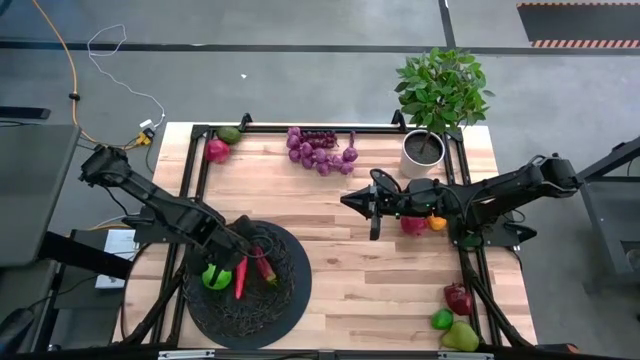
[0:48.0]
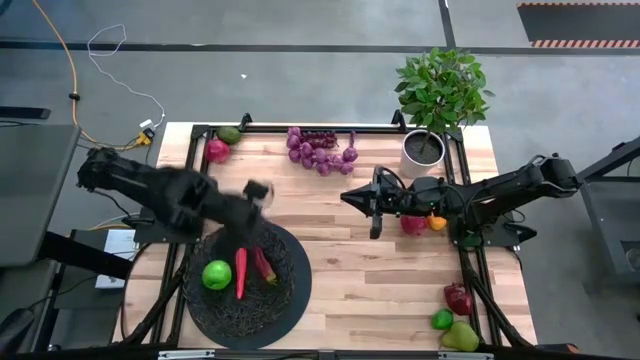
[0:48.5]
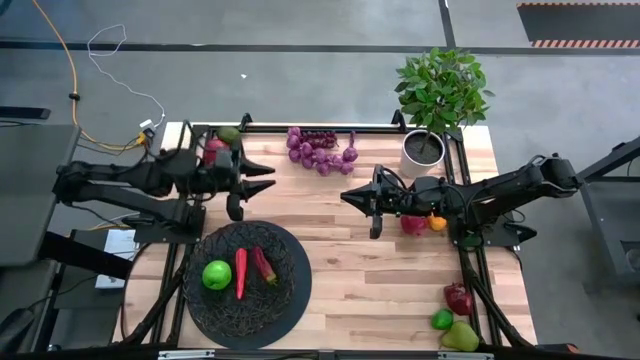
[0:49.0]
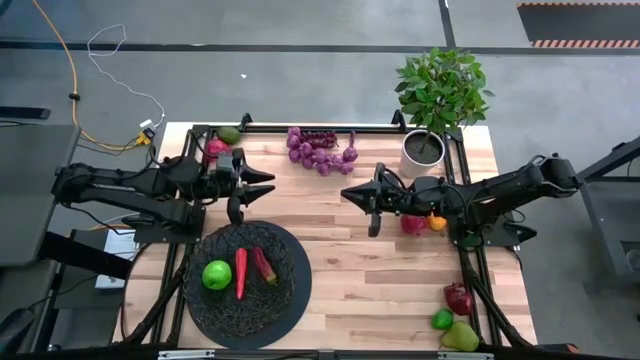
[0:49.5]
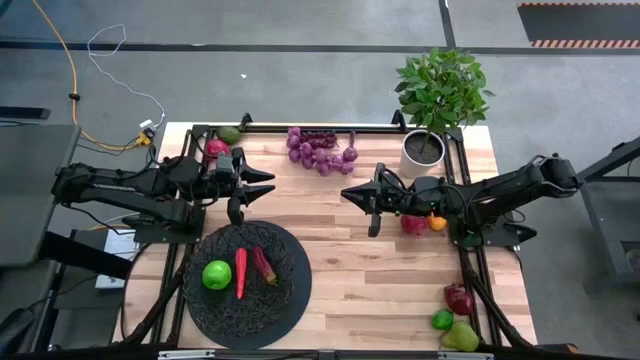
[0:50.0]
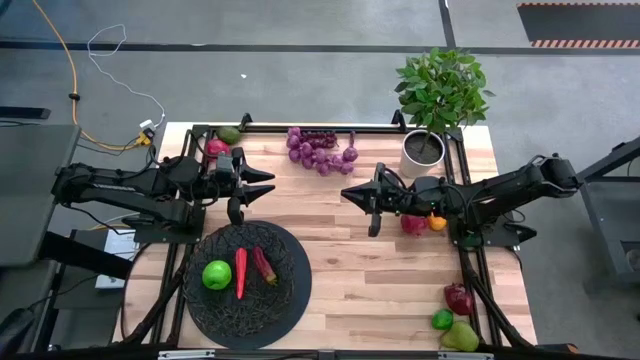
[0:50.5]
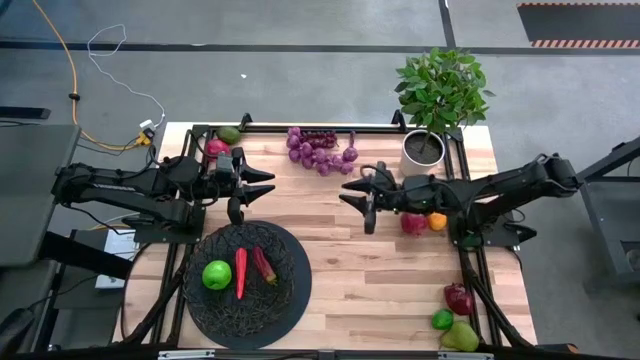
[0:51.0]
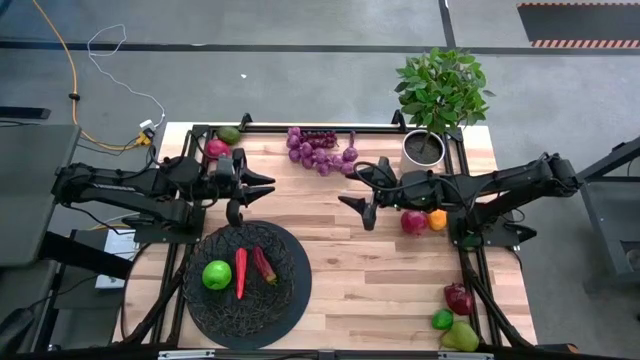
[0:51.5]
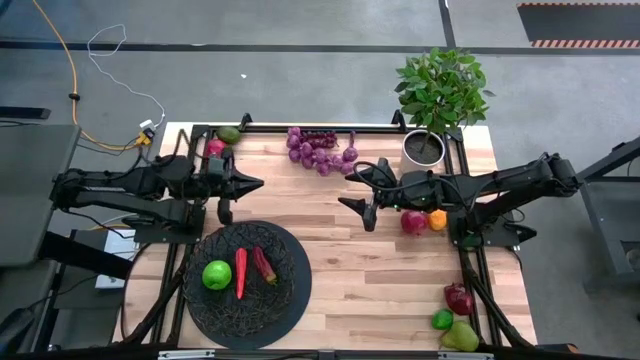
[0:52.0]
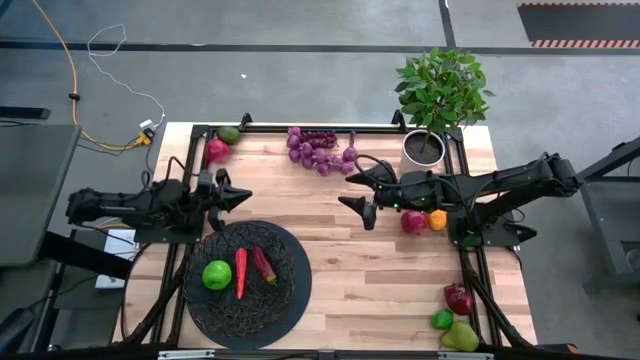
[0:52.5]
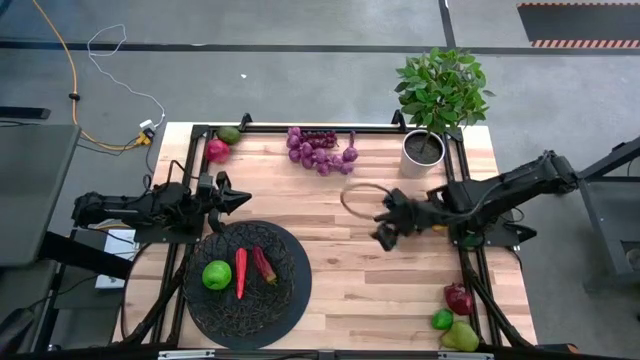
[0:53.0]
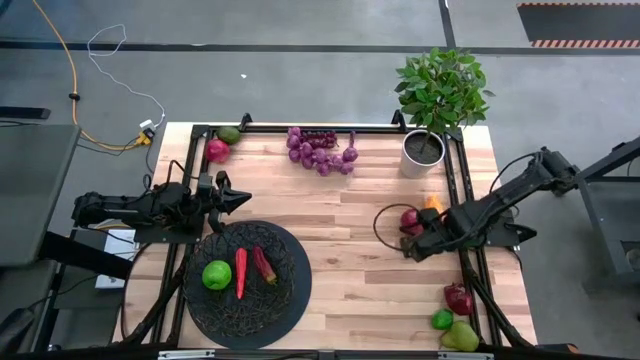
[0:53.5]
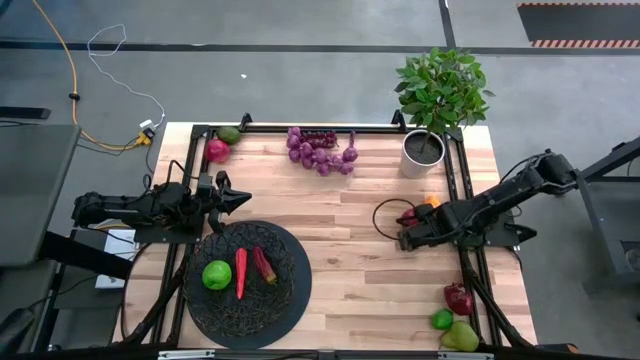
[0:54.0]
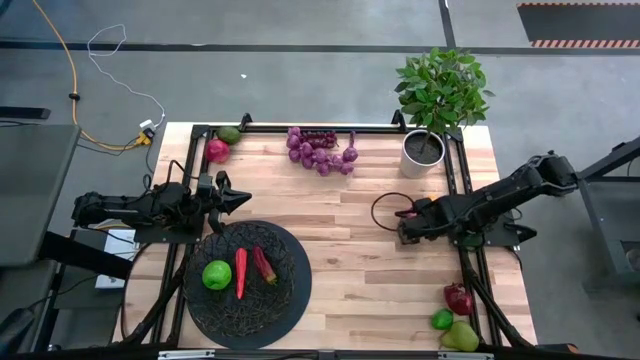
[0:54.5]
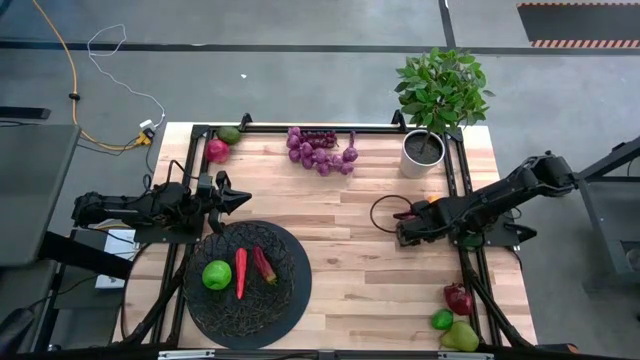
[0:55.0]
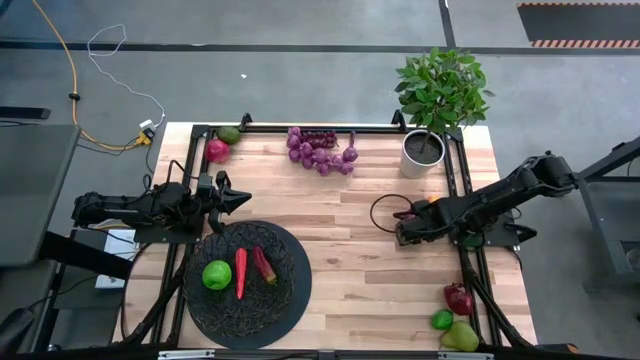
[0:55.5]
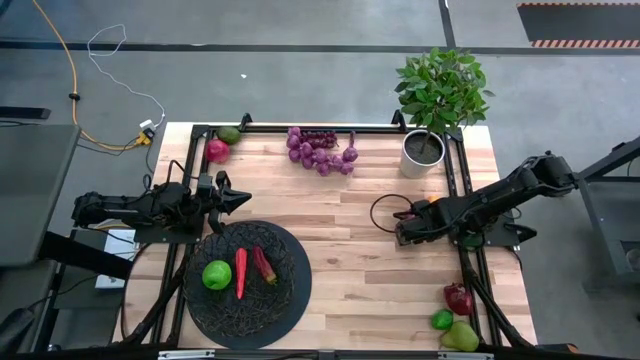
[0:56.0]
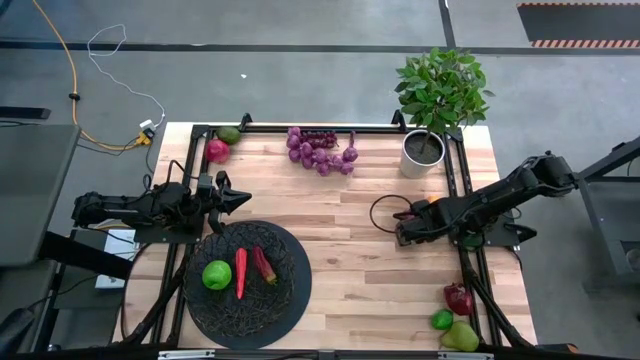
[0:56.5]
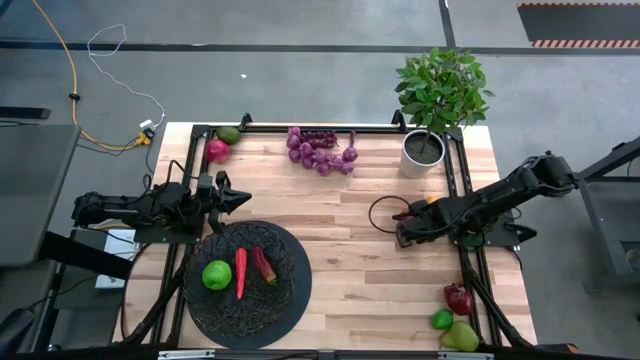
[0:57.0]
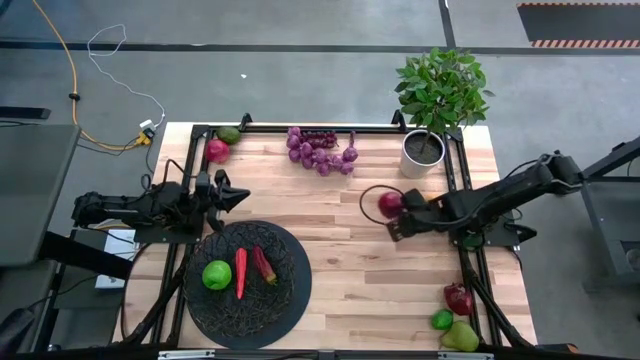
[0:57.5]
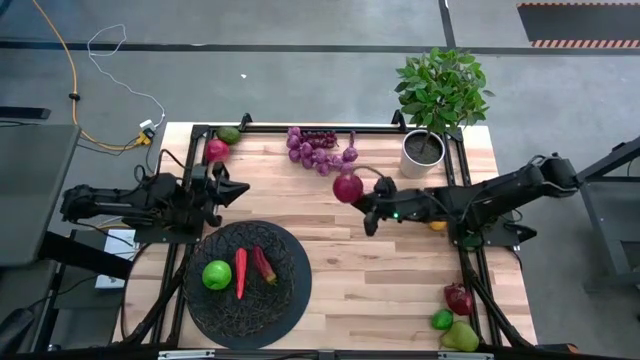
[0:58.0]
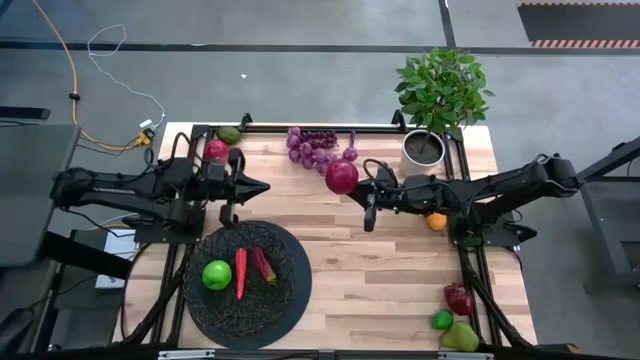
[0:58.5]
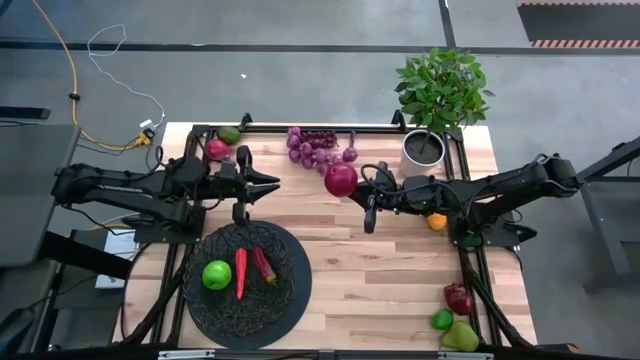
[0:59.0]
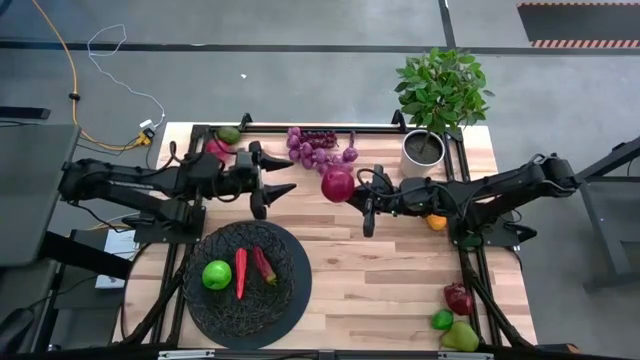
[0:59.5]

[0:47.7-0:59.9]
Task: Build produce basket
Put the bottom pomegranate into the black basket

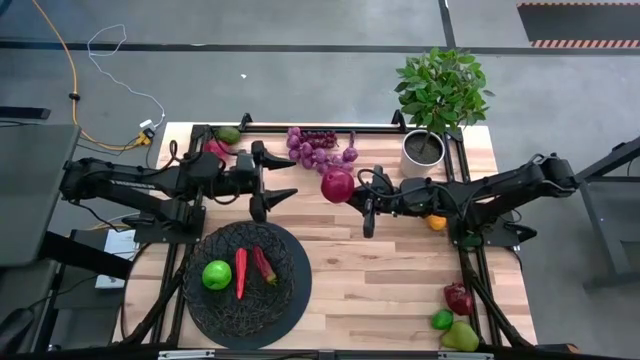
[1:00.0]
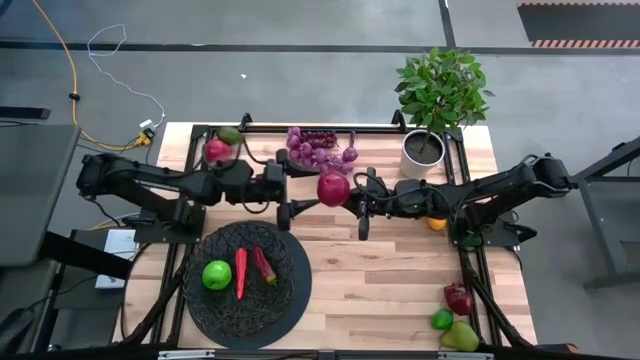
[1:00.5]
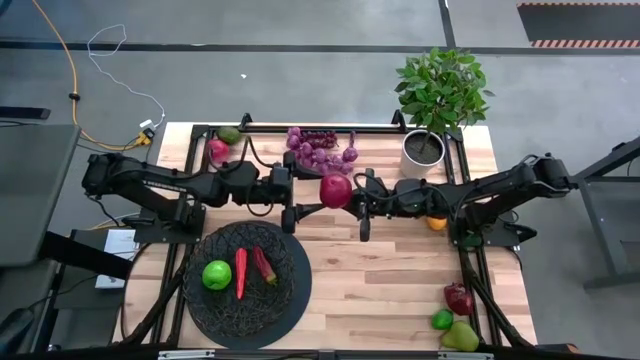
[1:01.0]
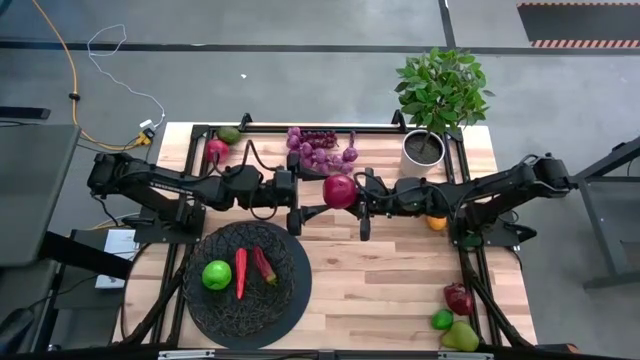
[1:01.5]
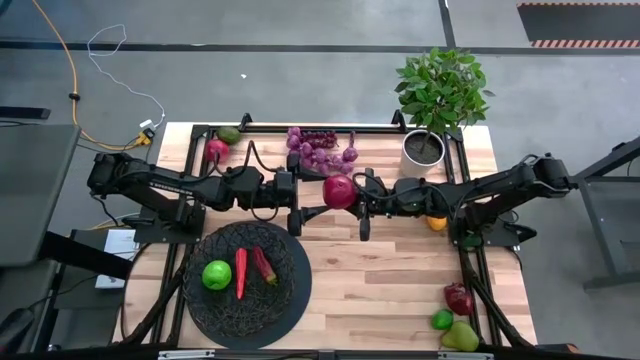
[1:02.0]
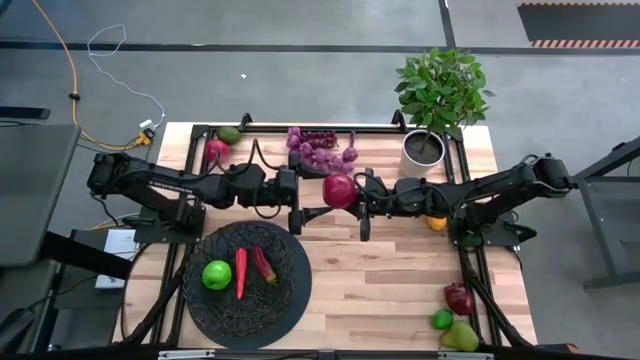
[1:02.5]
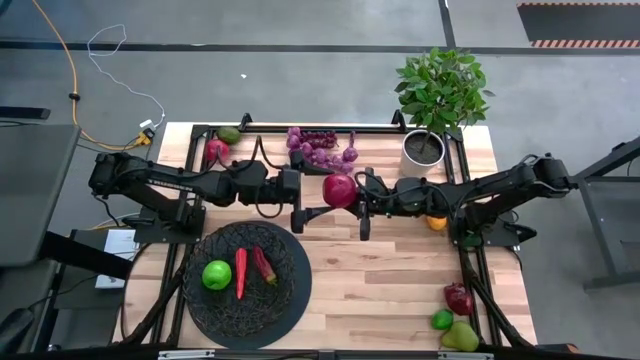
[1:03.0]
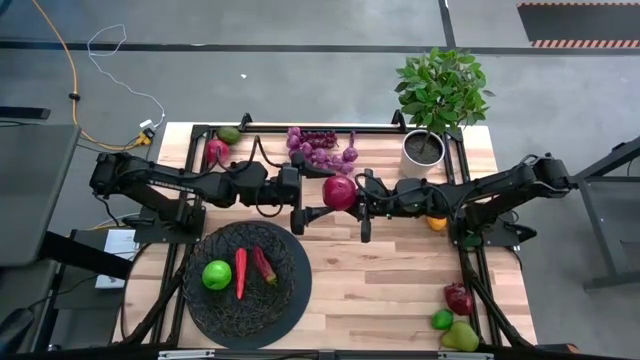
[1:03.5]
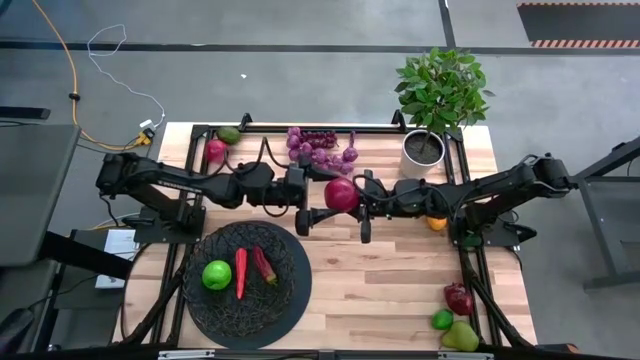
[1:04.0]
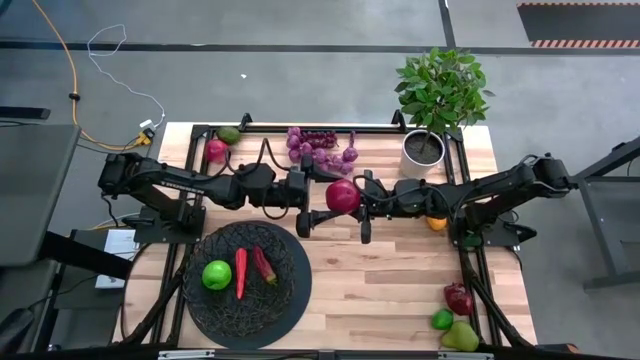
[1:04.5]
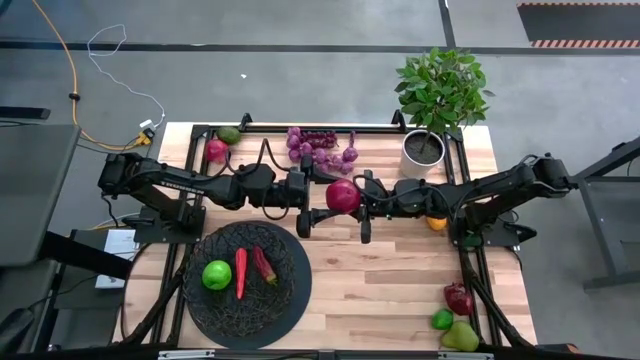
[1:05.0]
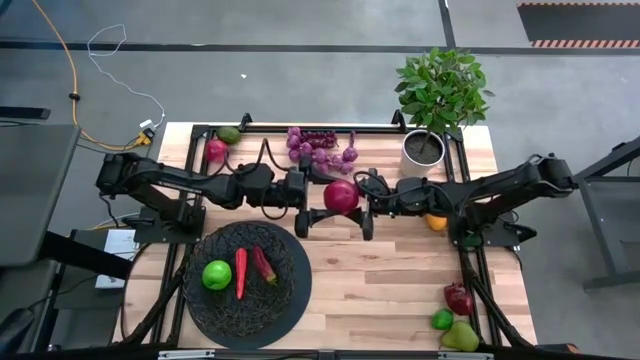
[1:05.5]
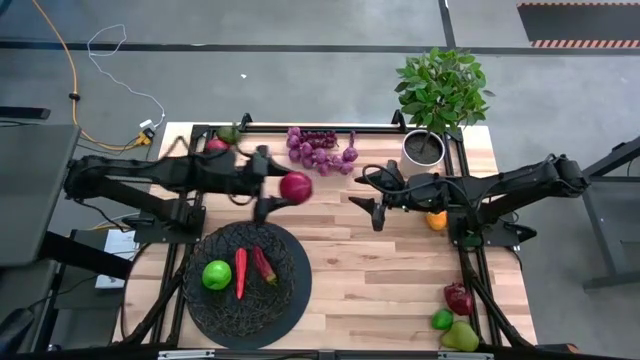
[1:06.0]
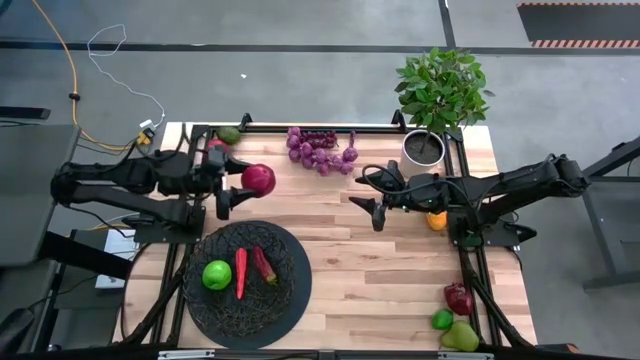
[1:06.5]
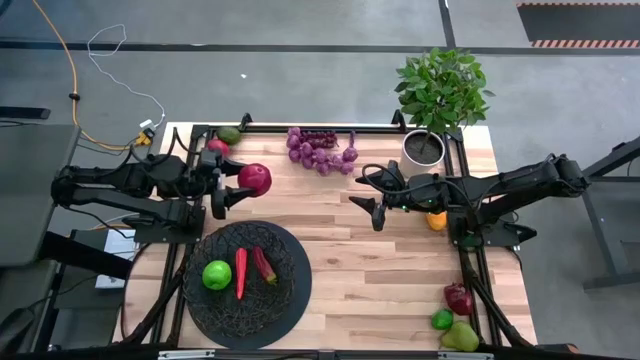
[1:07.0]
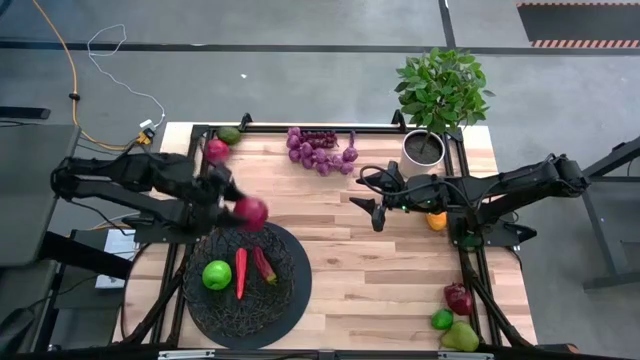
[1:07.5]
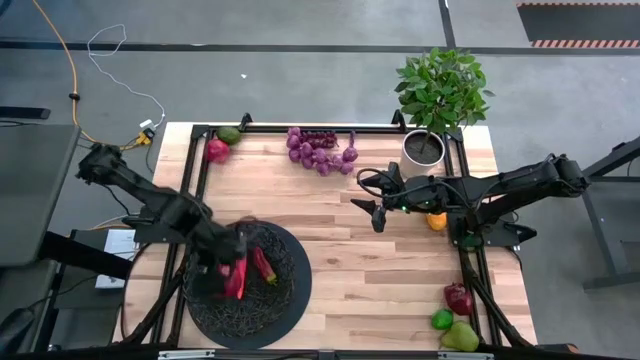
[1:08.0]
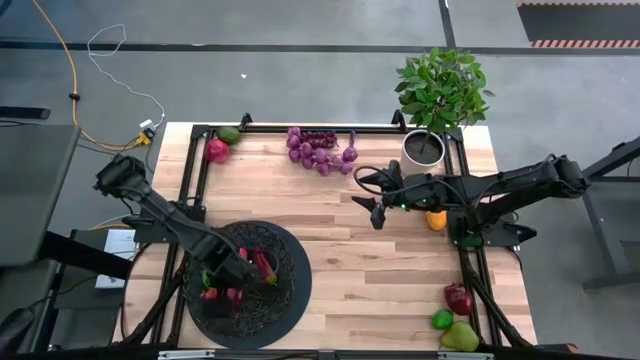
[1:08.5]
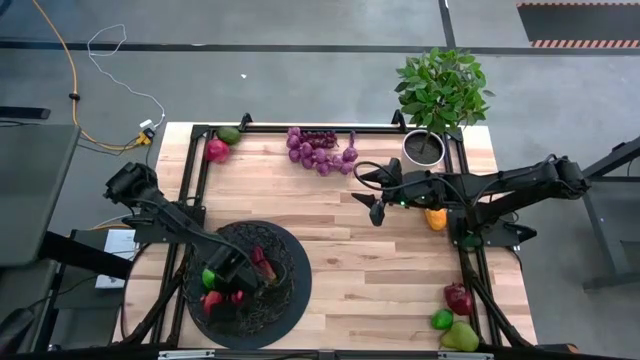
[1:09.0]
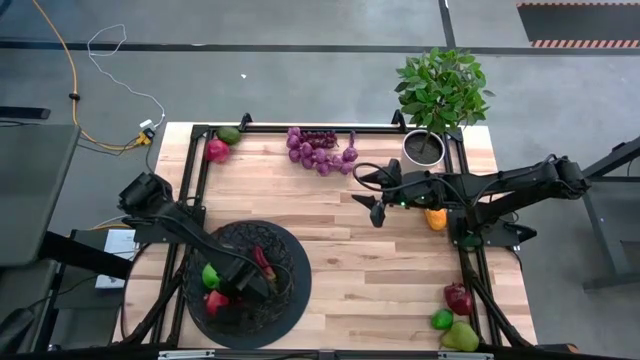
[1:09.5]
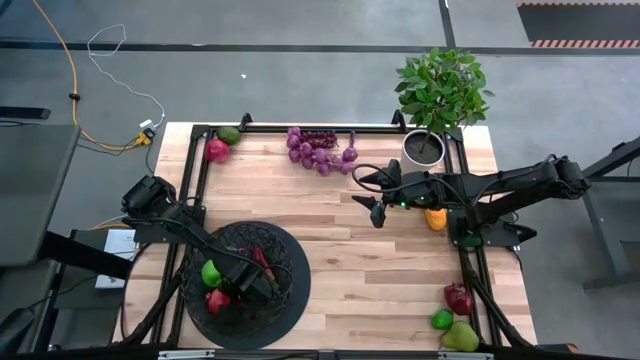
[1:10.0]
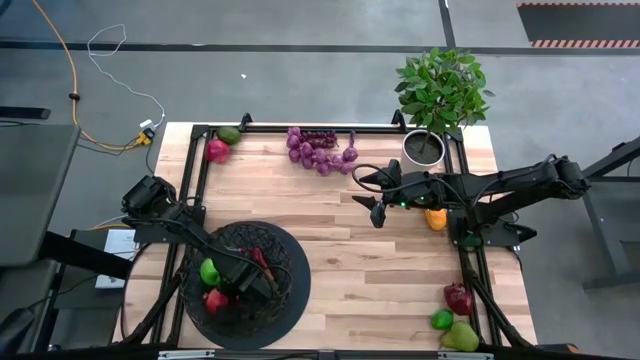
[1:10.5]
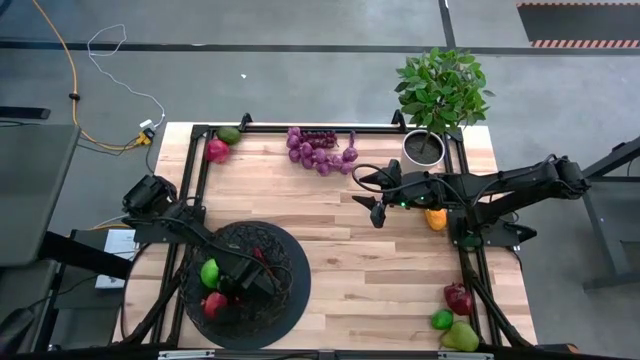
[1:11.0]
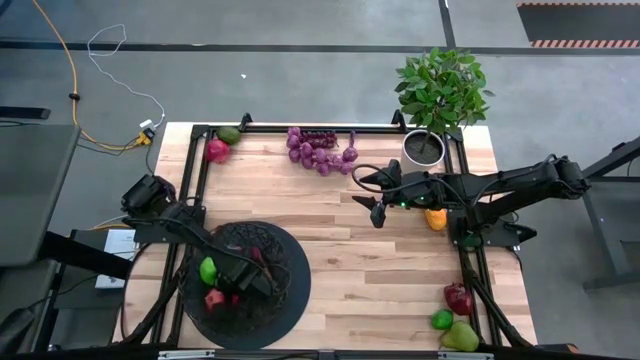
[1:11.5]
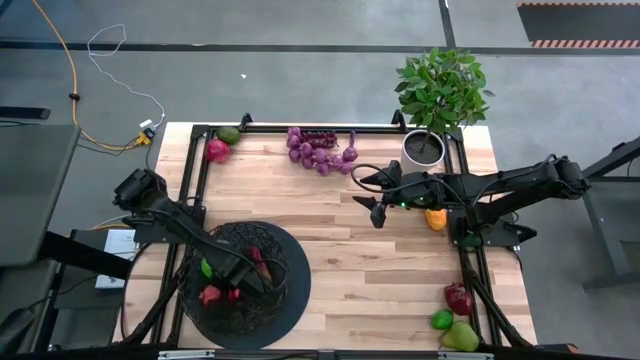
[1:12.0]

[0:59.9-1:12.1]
Put the bottom pomegranate into the black basket
